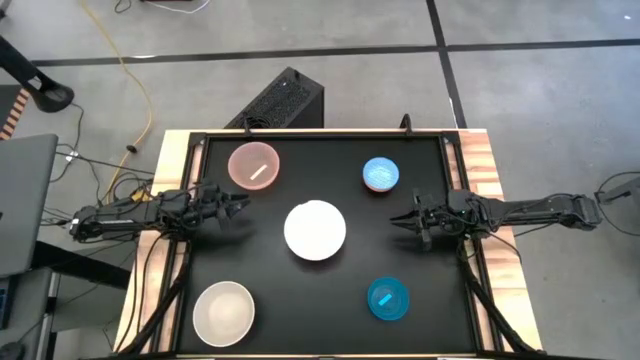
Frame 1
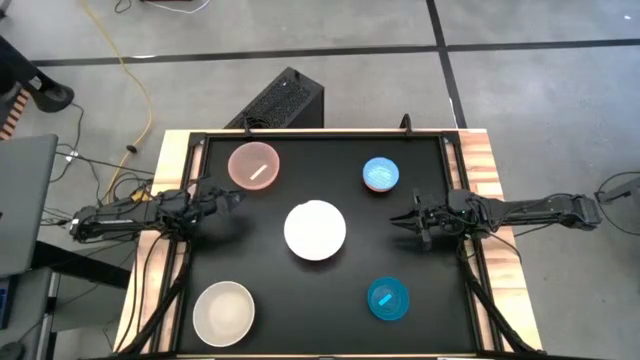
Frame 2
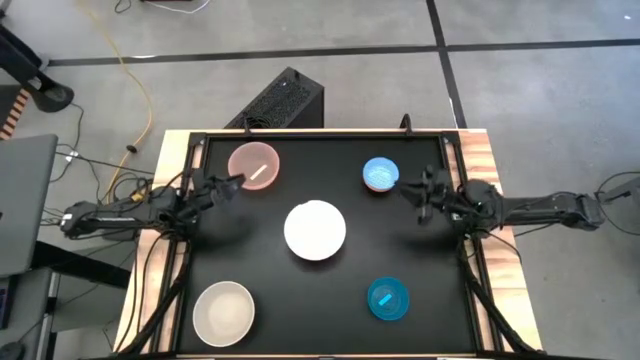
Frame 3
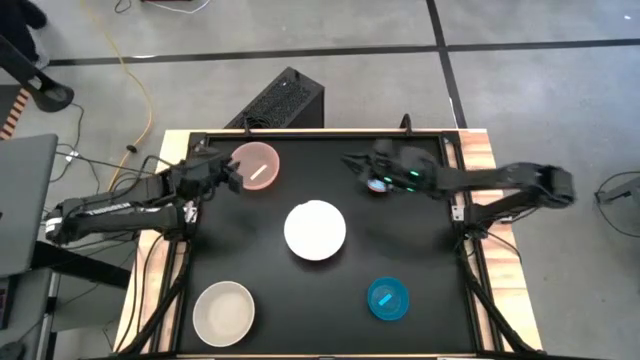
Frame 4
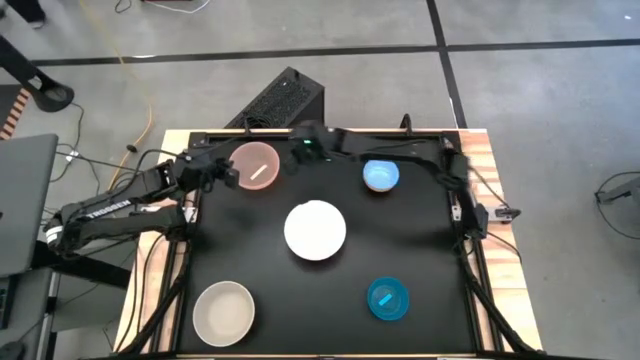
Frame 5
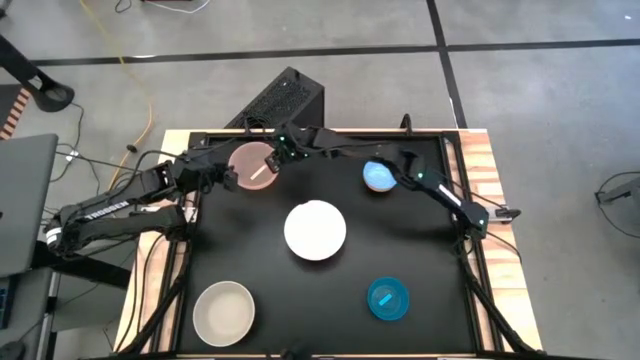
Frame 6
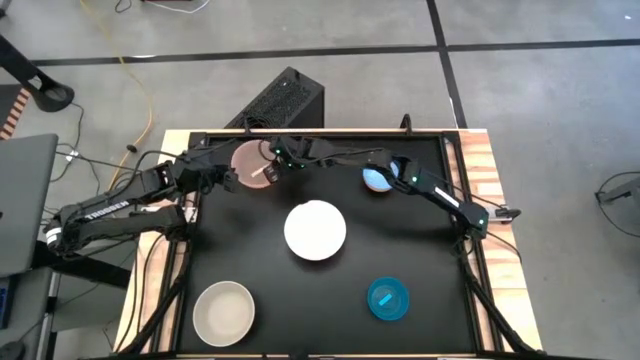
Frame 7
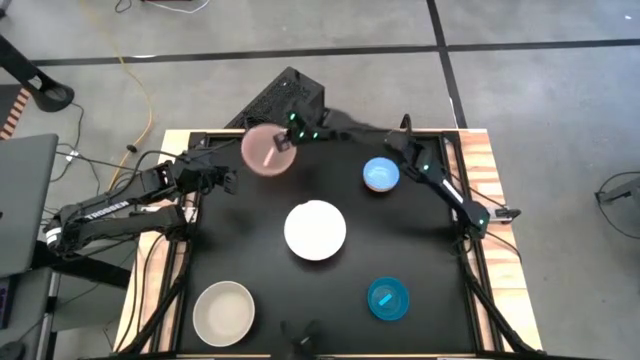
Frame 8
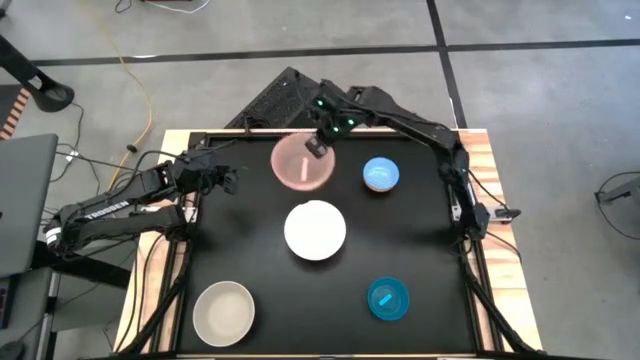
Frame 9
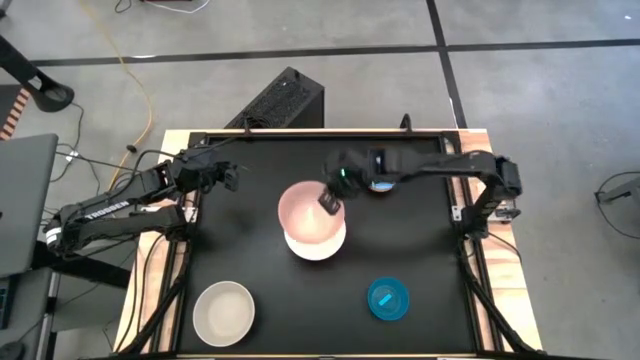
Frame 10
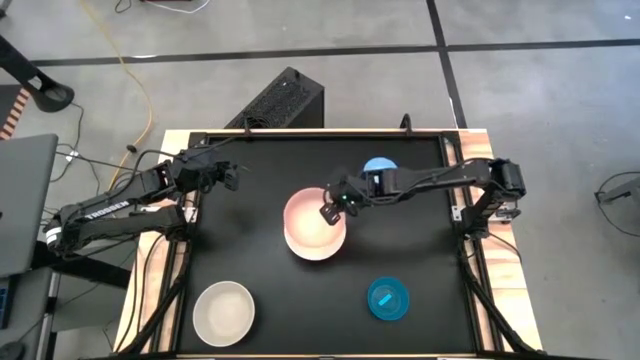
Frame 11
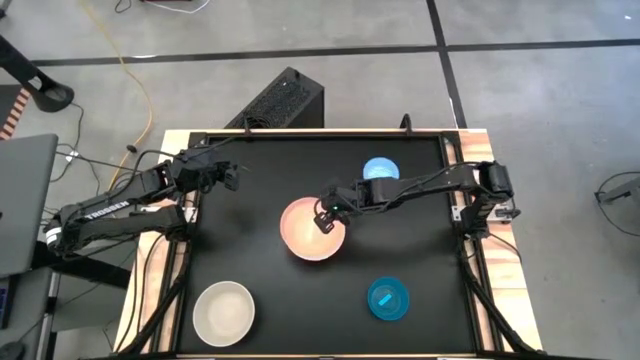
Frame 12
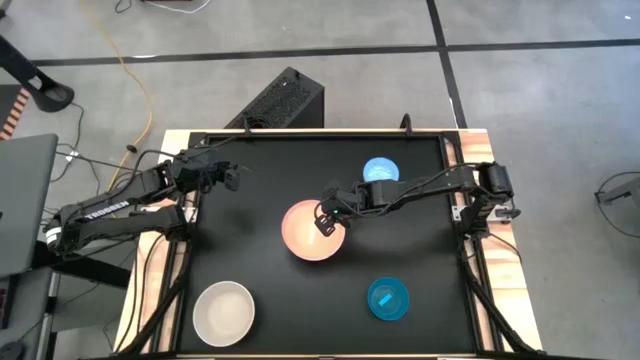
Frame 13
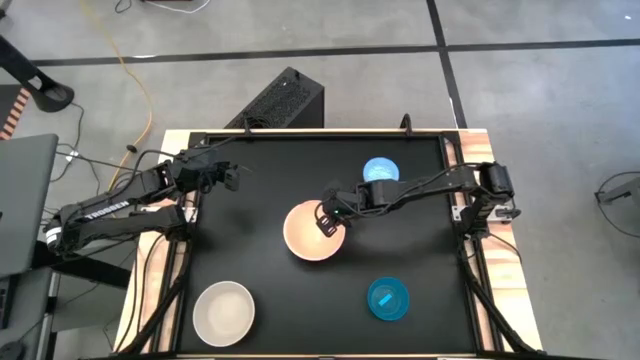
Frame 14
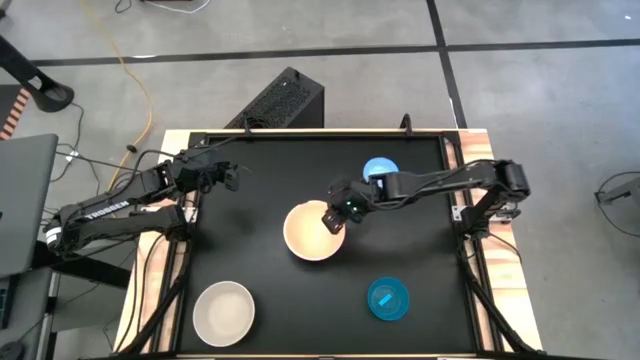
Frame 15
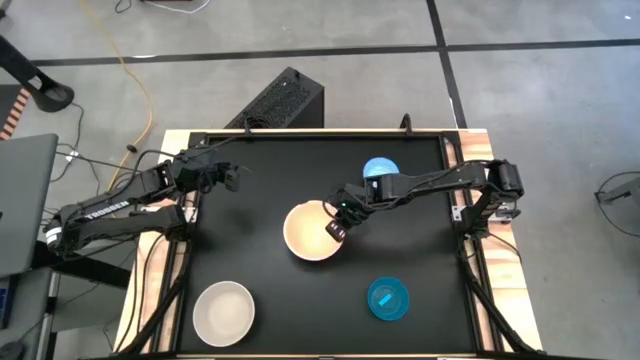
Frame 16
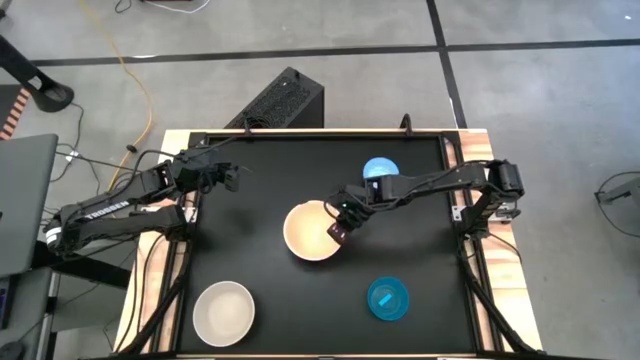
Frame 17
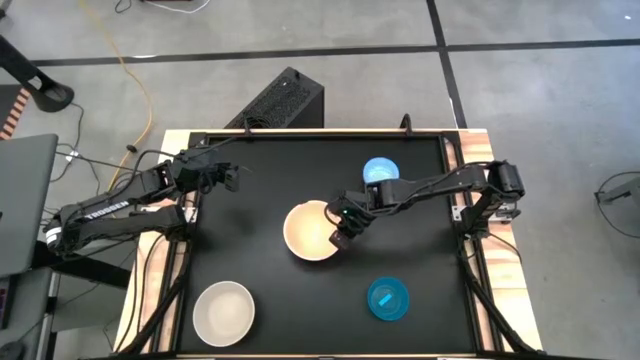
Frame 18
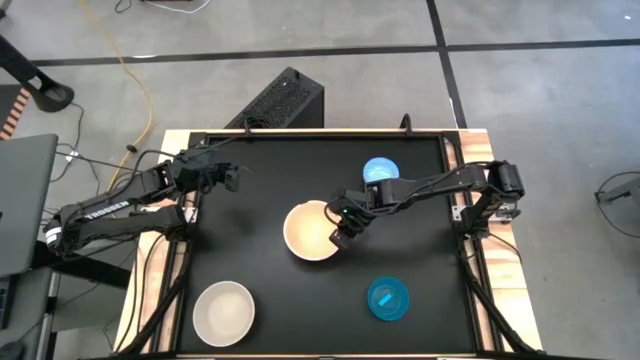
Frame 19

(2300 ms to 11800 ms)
Stack the light orange bowl on the white bowl

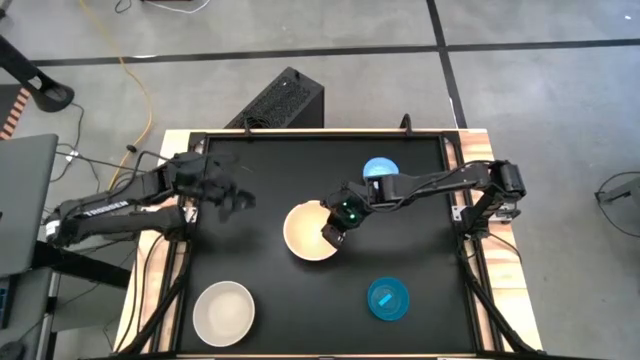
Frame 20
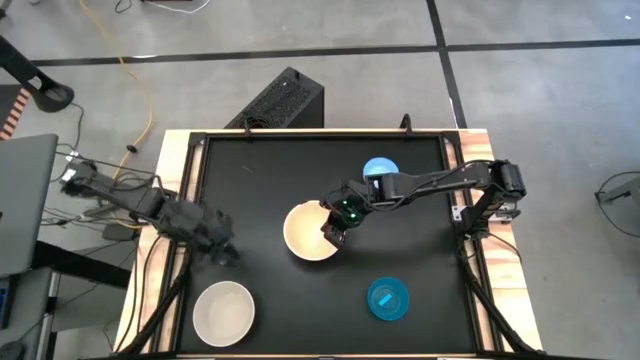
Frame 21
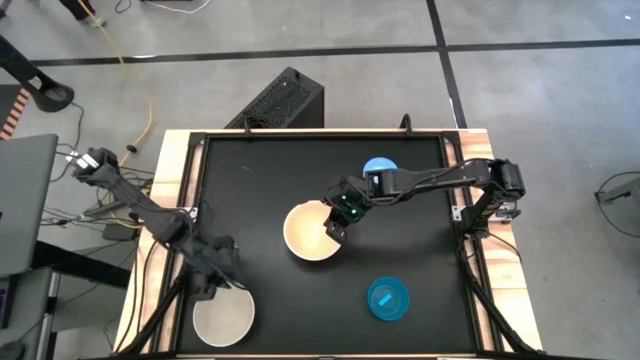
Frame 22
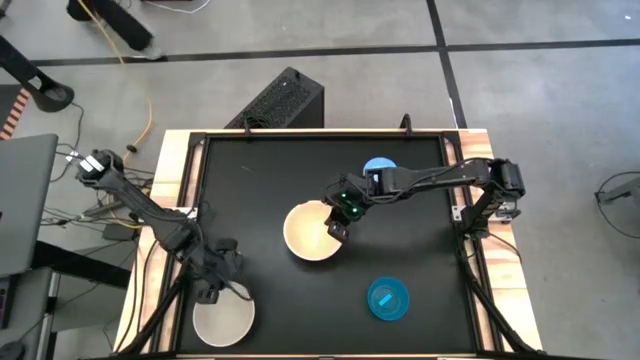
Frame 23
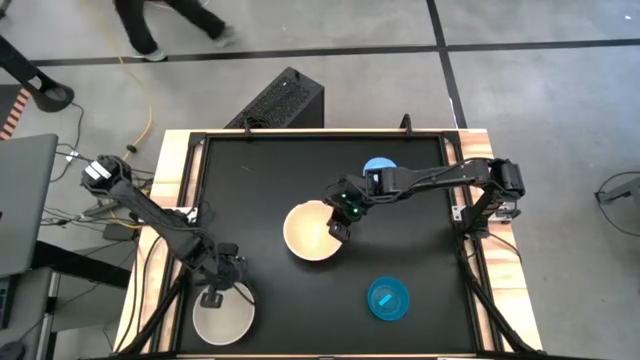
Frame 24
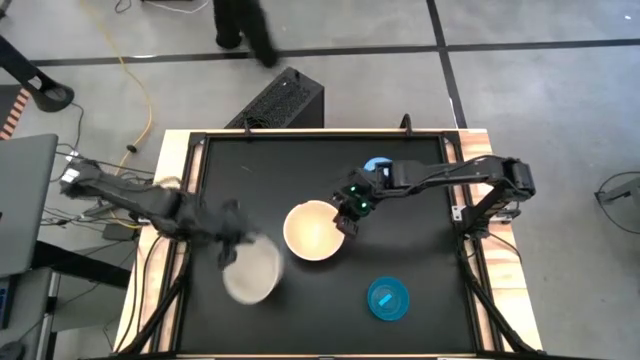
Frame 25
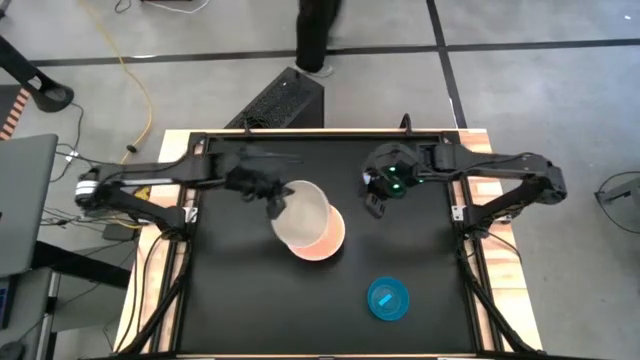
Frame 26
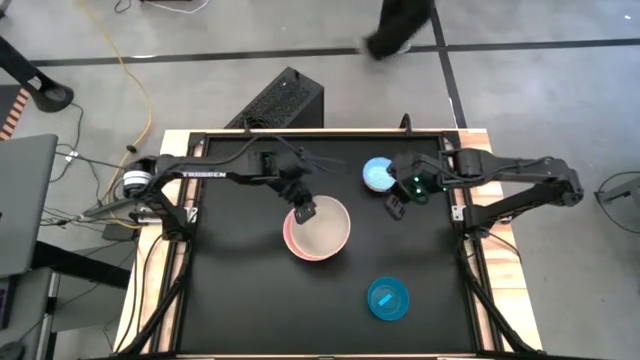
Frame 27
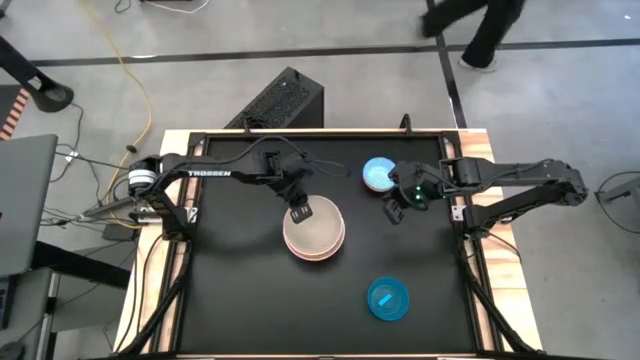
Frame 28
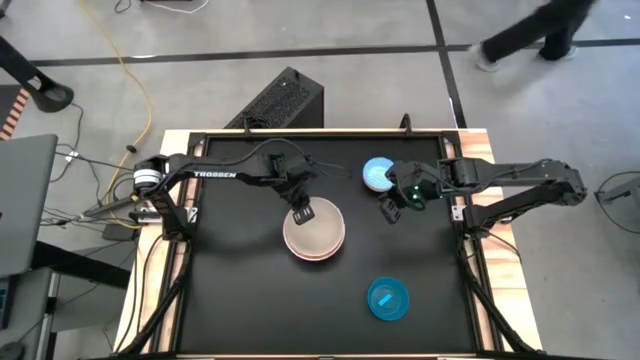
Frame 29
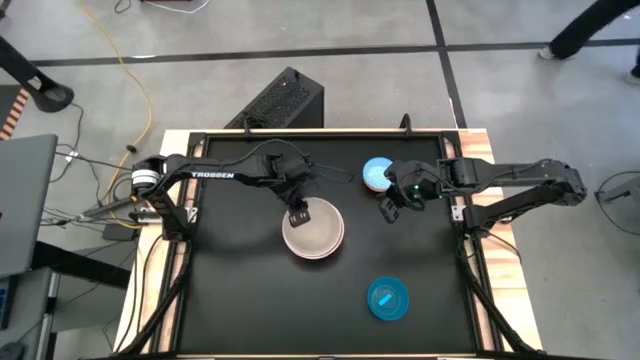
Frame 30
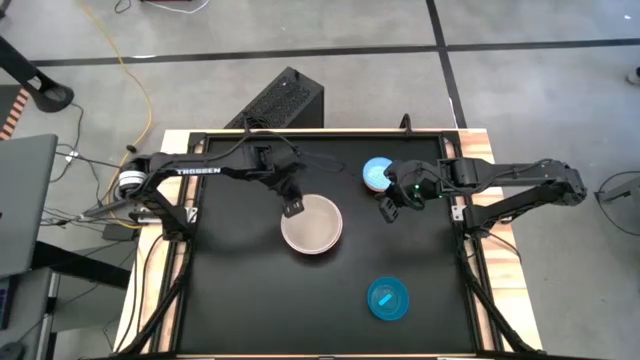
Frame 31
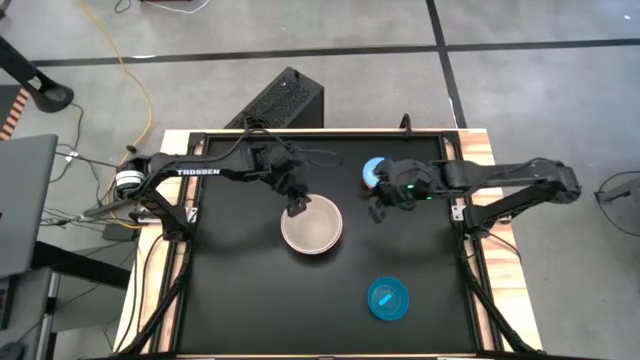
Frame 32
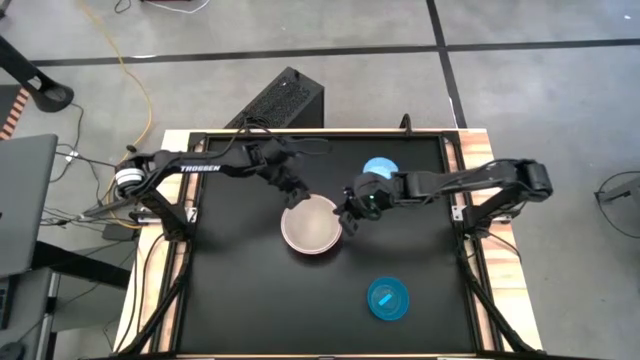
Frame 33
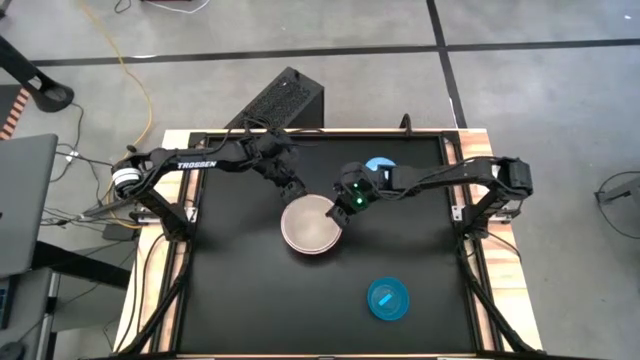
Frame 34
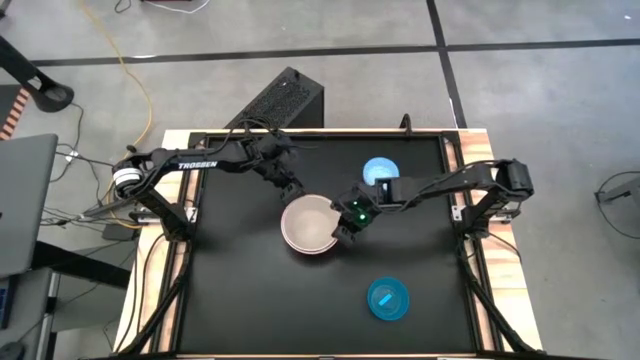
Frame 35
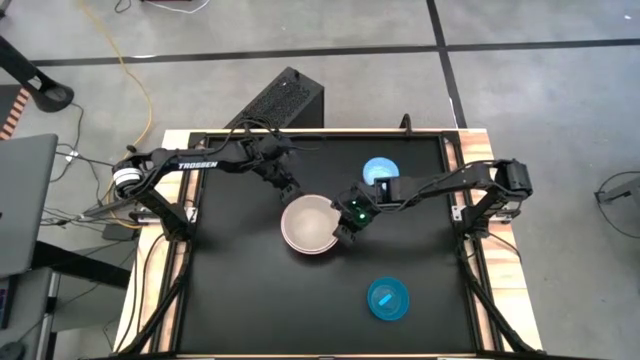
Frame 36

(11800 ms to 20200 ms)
Stack the grey bowl on the light orange bowl

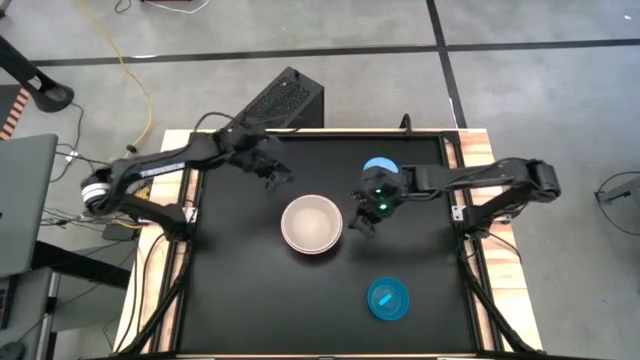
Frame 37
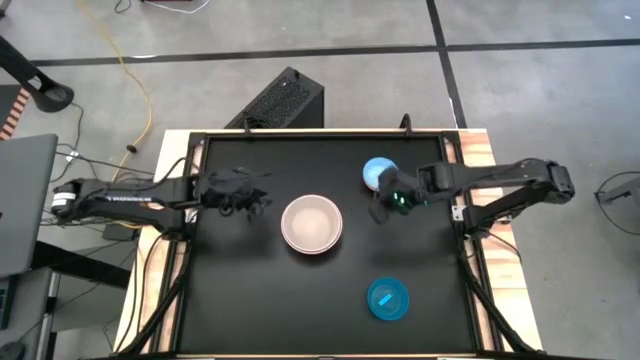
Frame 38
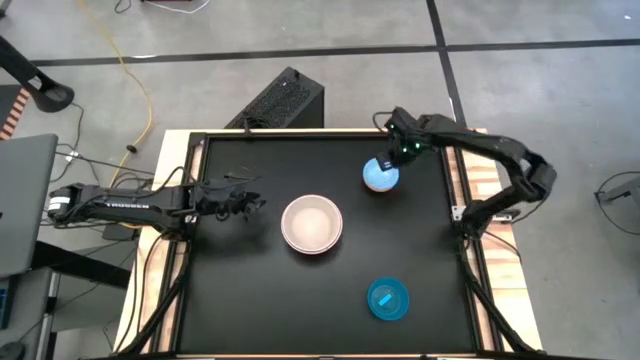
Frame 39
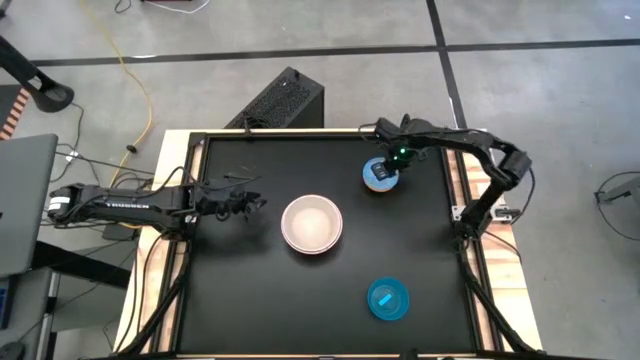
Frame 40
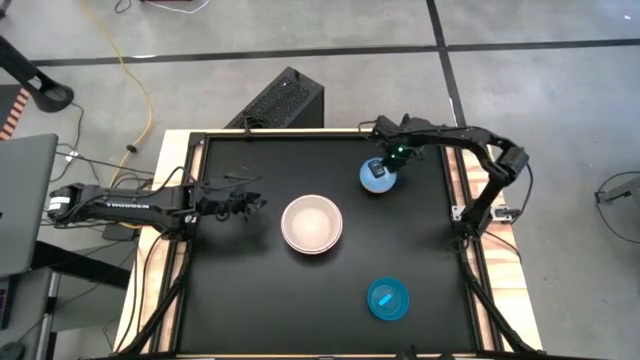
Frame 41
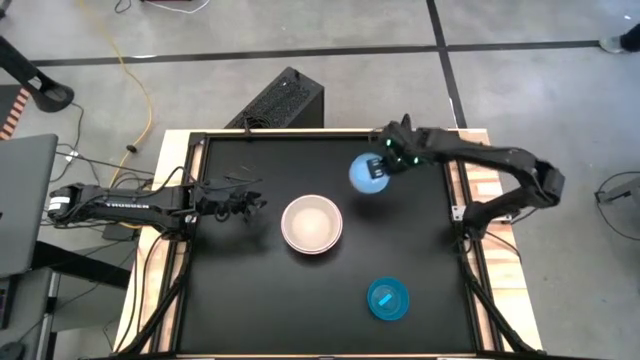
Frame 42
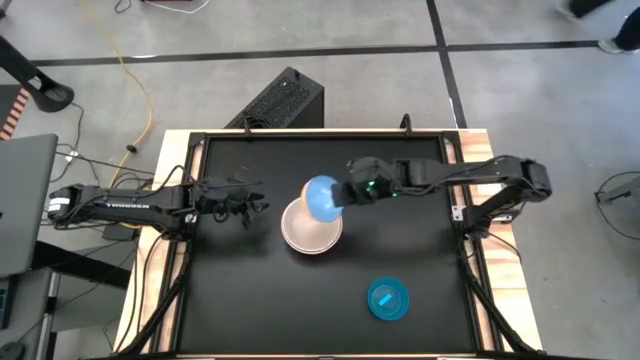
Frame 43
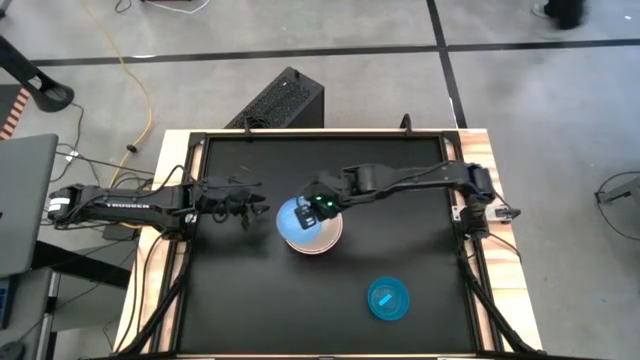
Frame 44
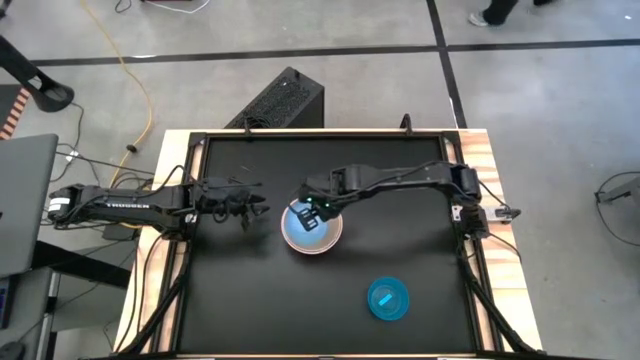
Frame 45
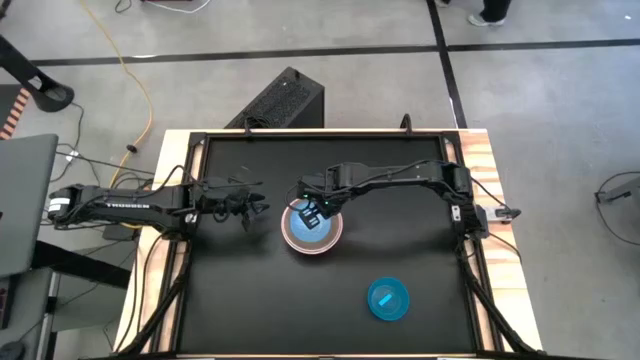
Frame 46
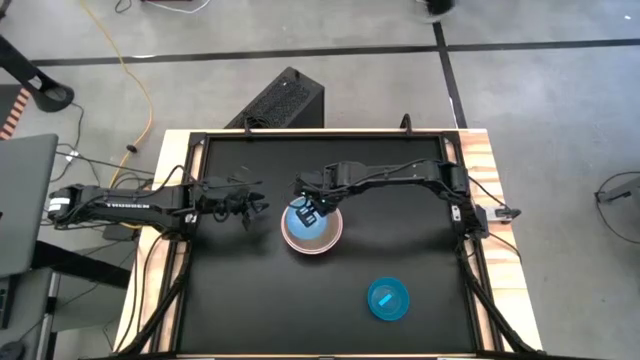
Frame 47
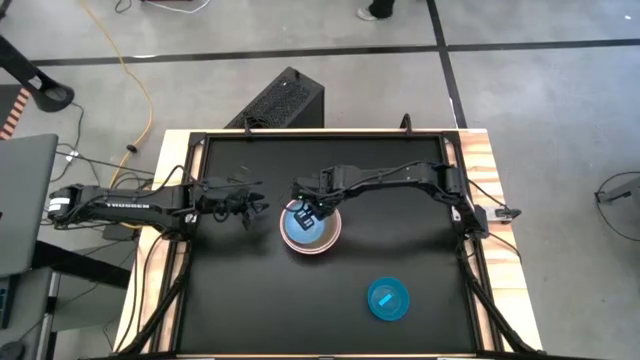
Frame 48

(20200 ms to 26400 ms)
Stack the blue bowl on the grey bowl
